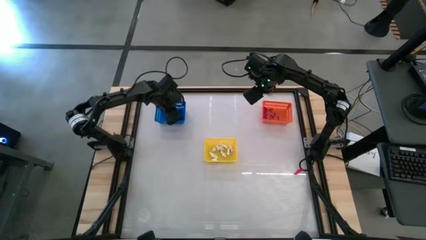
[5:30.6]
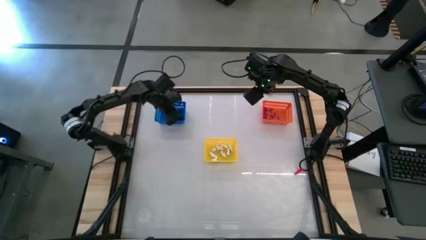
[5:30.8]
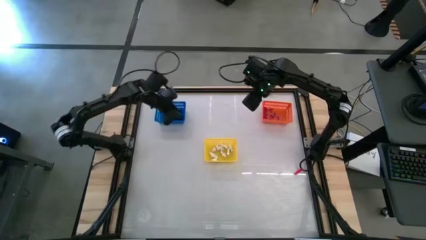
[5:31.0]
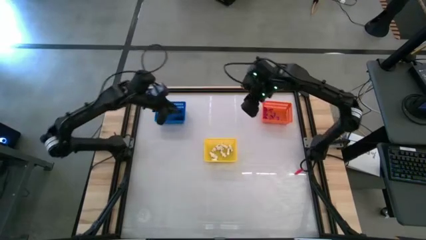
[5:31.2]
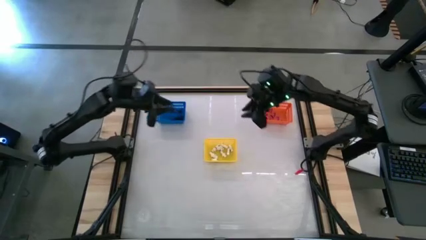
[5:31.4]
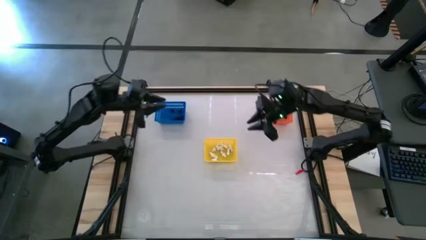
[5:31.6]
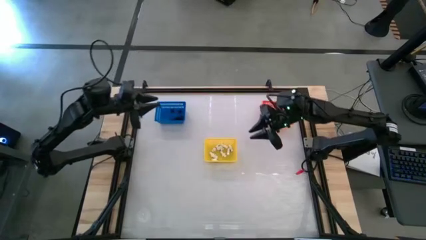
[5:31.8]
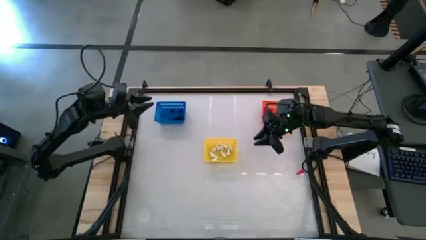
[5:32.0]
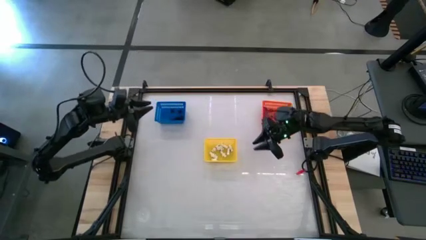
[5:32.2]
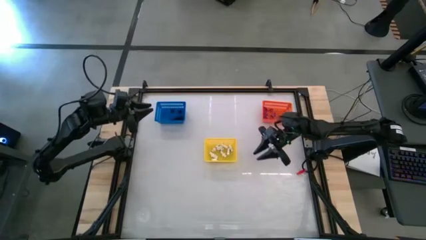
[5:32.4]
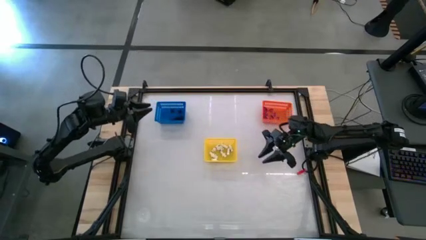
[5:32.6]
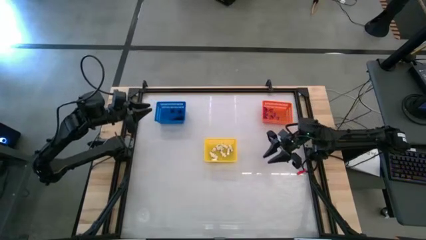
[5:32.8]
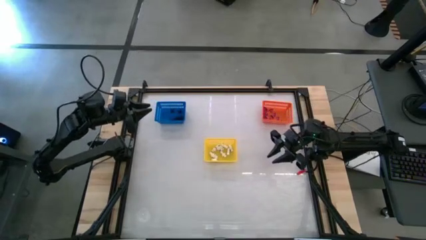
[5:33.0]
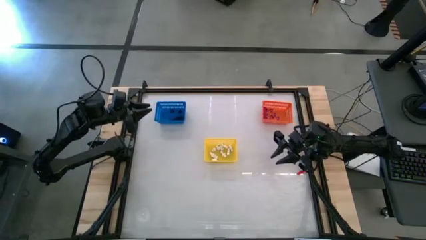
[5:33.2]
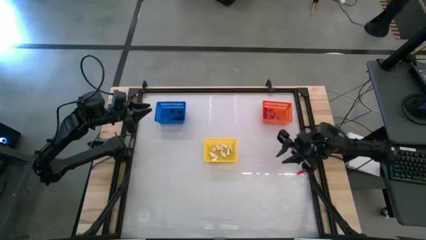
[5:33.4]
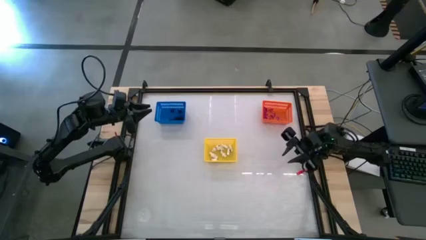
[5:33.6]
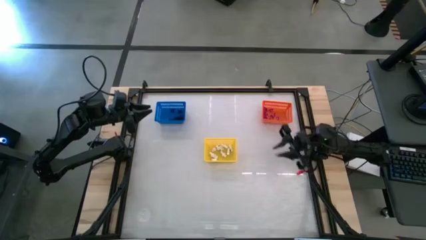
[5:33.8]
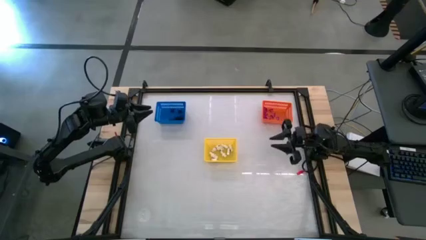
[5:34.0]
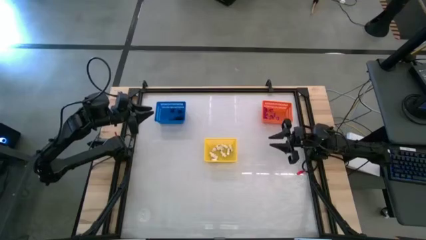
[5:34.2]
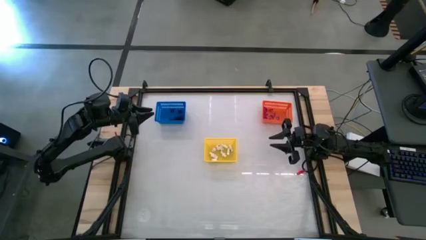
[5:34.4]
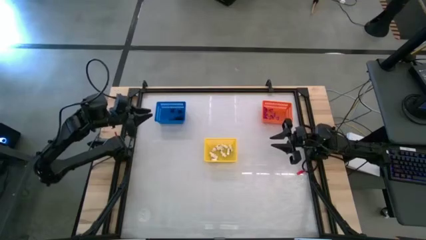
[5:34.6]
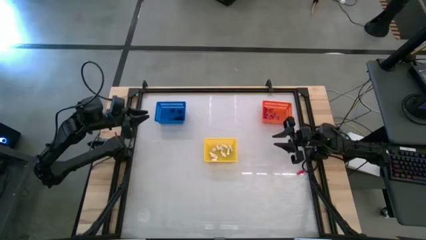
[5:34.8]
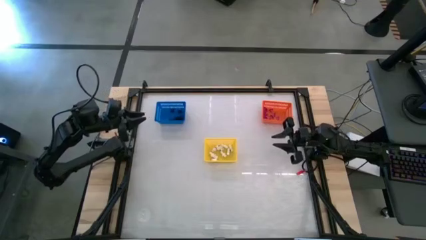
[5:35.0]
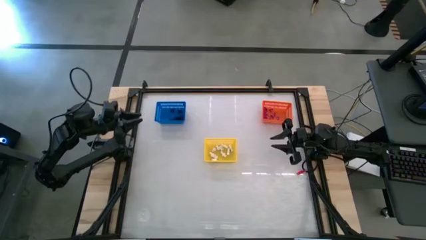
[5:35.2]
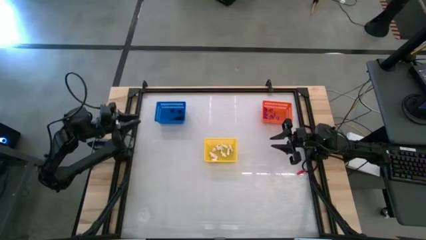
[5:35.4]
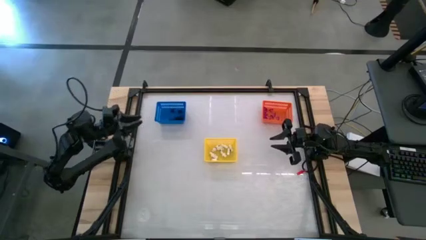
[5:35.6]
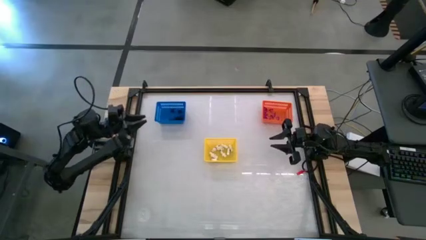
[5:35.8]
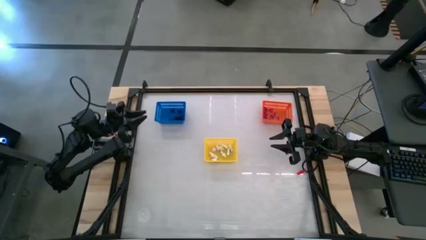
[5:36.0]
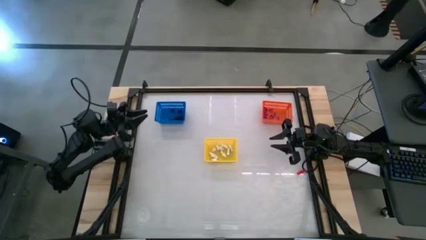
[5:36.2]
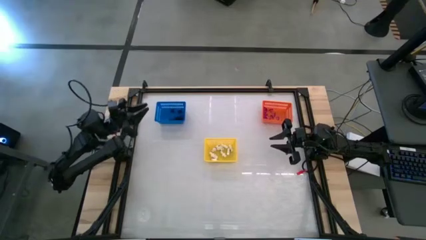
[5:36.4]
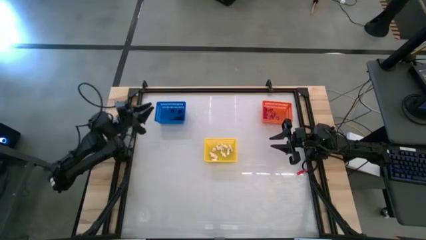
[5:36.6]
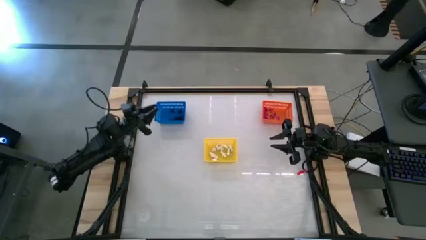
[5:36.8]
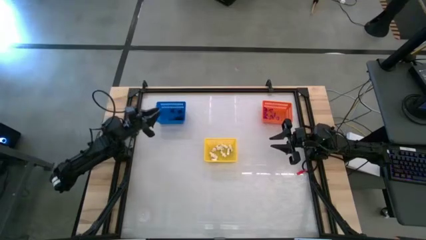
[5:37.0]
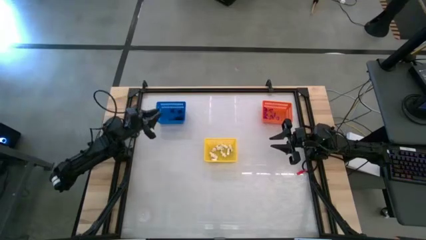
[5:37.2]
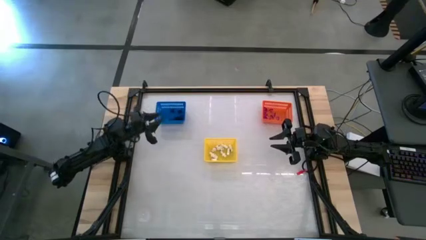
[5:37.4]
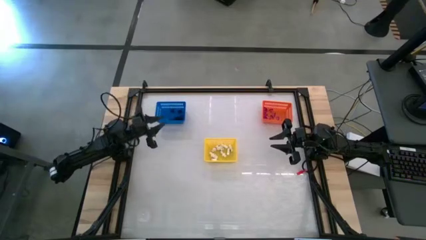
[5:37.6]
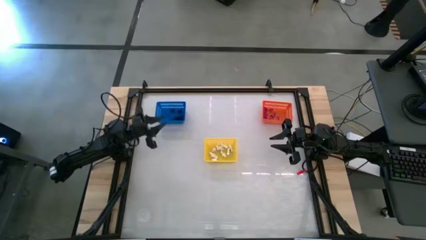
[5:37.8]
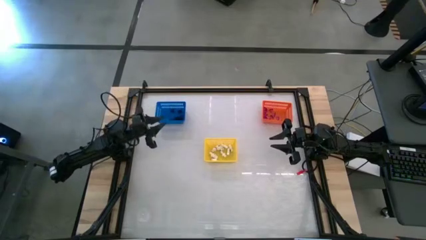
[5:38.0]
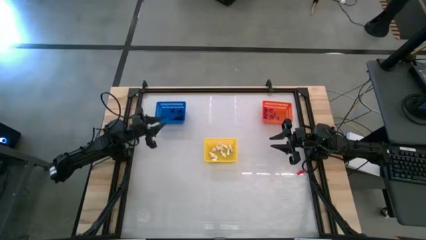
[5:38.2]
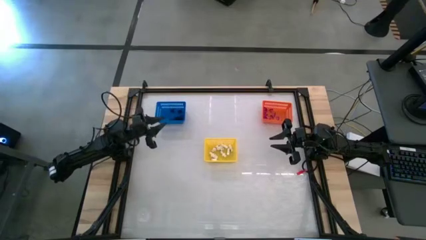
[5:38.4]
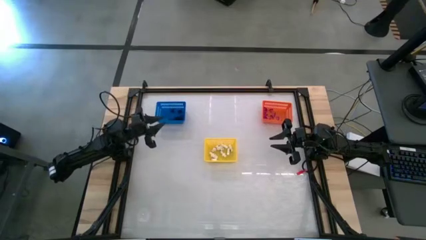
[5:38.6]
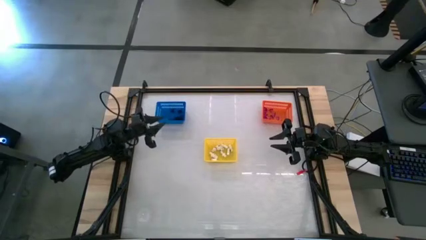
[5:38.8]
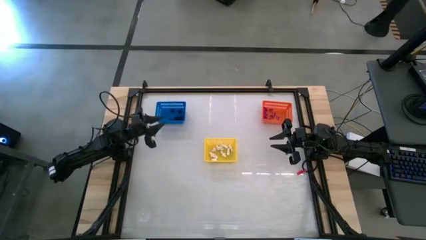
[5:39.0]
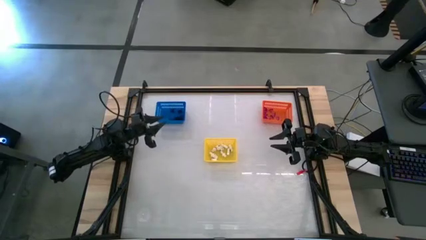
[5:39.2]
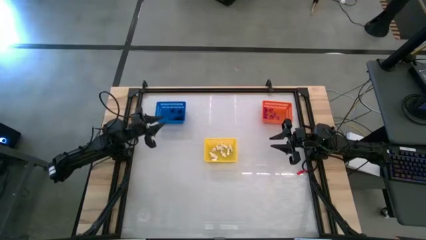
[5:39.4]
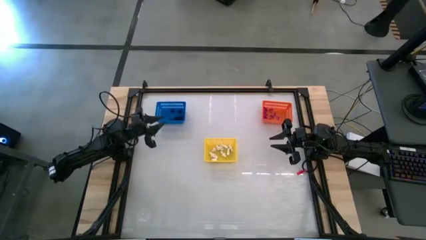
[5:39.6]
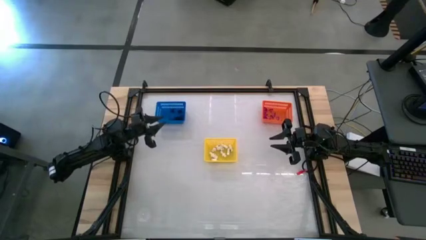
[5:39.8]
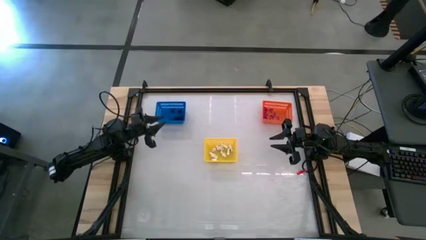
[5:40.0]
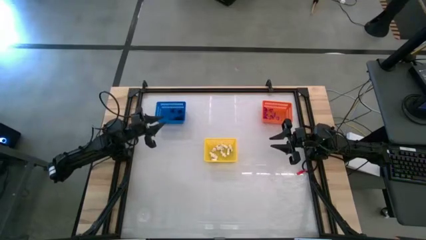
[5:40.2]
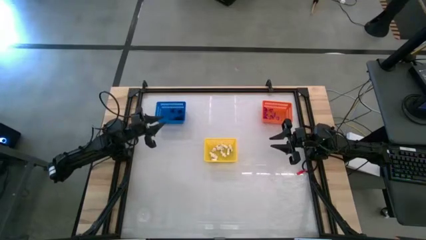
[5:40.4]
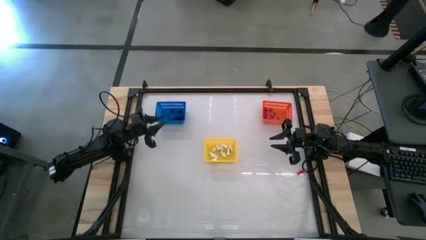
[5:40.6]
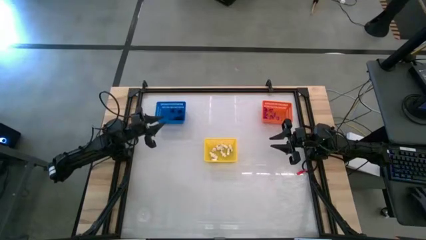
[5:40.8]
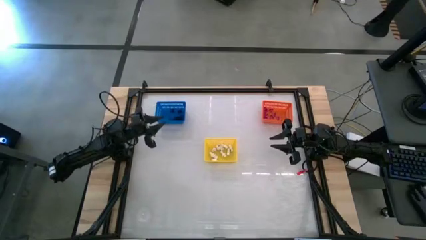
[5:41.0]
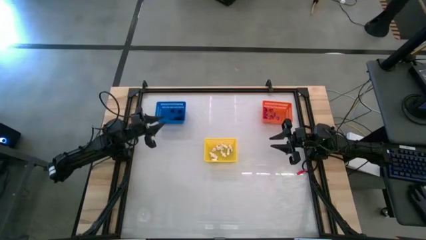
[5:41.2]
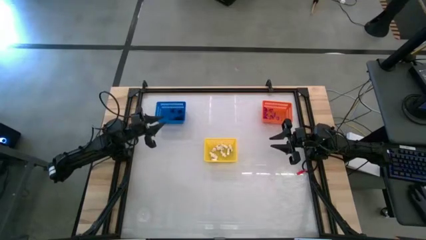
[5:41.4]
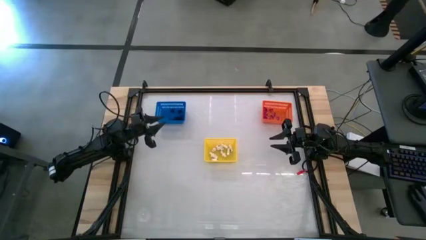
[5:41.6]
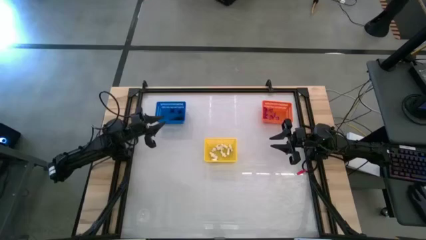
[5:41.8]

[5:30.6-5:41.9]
Task: Sort Halloween decoration
Return to Home Position

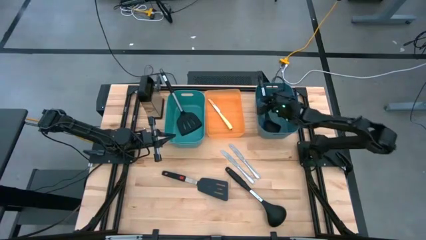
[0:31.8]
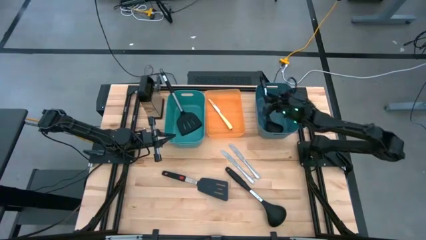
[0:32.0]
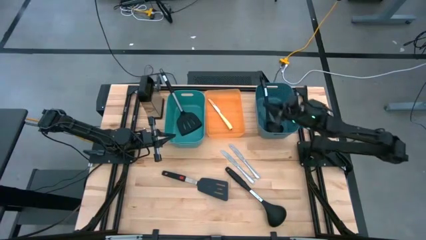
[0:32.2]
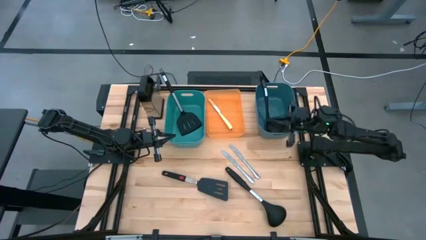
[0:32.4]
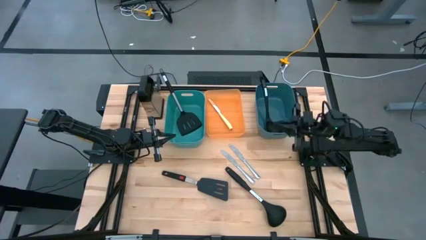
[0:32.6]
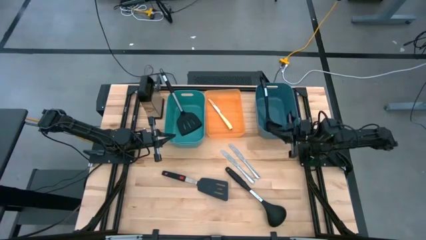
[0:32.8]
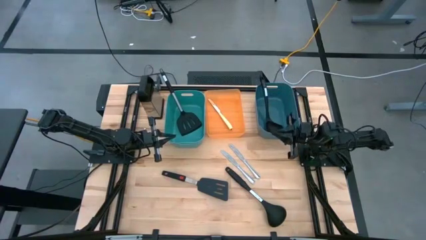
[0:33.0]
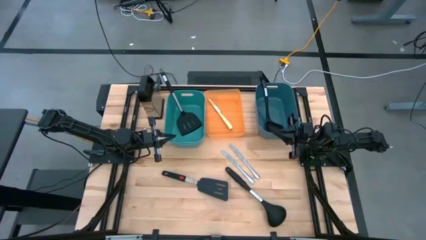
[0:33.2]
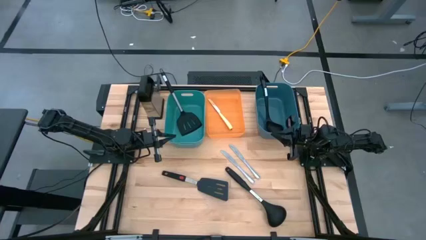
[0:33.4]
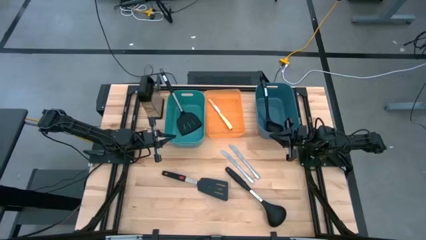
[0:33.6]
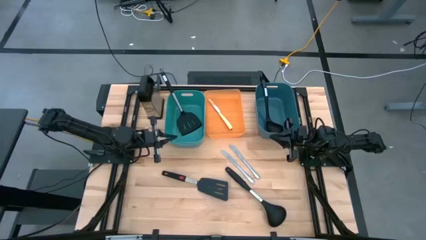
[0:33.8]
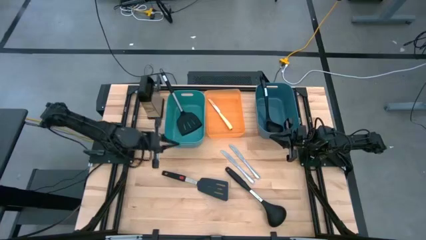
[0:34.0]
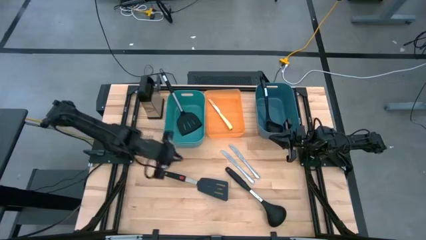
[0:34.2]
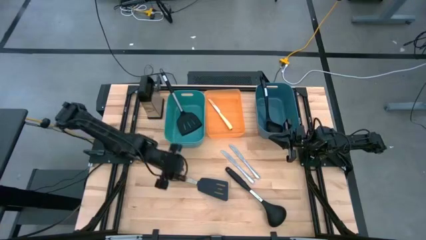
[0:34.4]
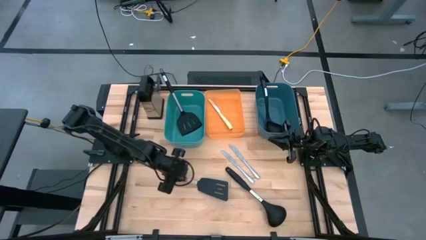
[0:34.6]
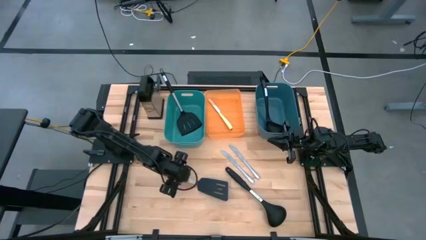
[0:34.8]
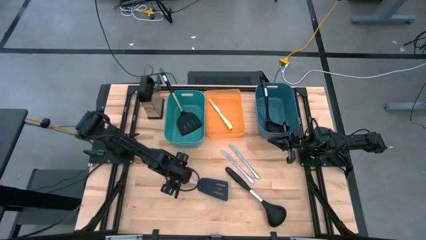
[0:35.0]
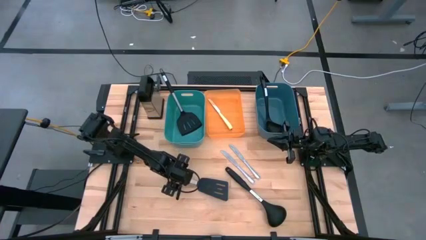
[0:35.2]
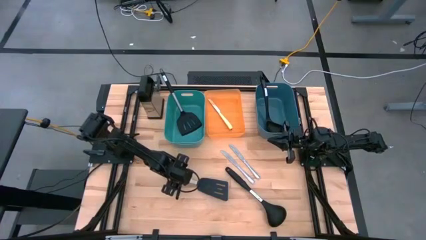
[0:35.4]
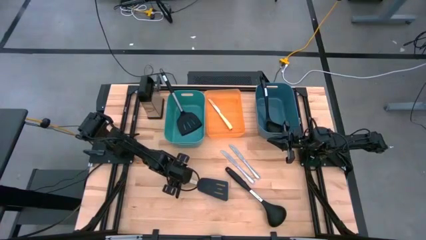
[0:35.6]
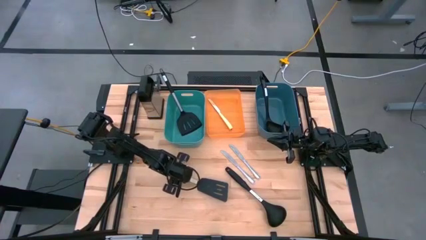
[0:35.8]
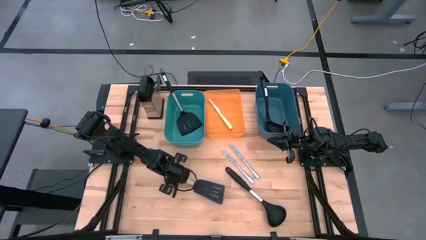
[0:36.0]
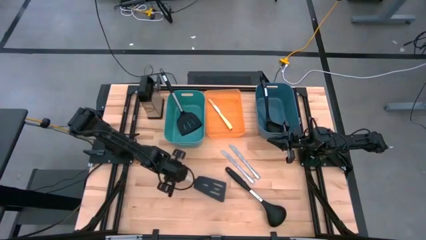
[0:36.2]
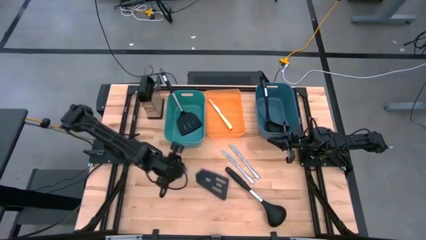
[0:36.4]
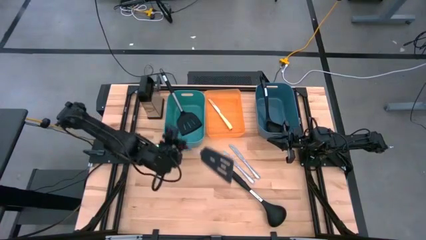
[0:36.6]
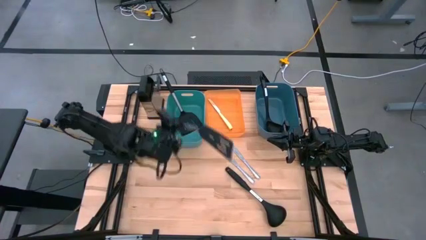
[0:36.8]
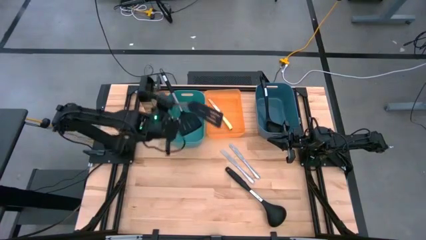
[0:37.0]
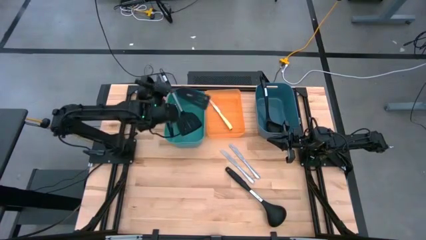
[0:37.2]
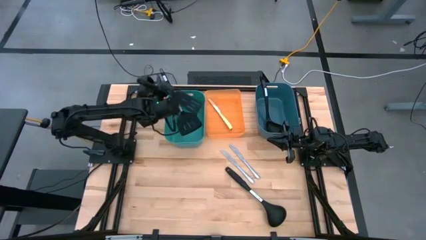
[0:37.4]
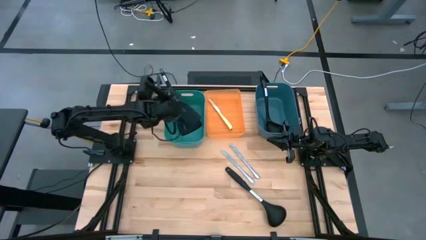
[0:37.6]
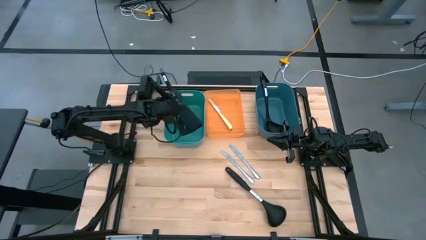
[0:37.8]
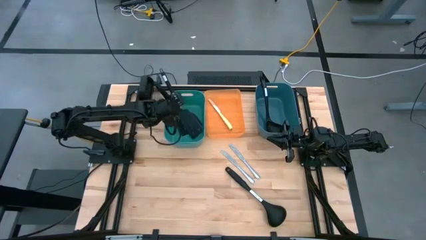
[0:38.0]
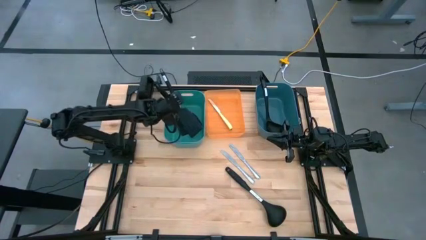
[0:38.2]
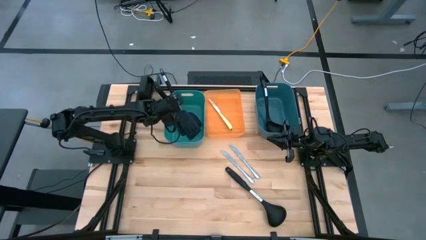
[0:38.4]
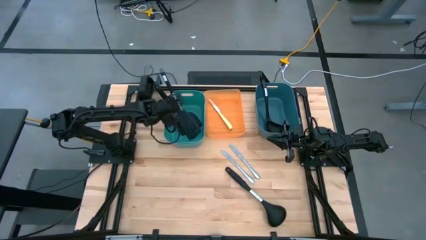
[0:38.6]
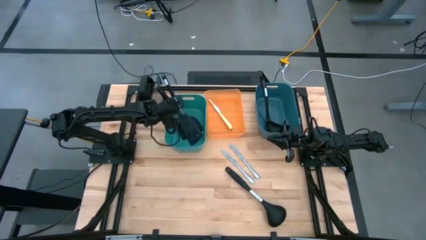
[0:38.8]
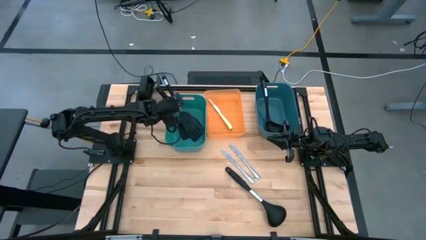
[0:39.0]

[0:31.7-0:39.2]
Task: Pick & Place Kitchen Items
Put the black slotted spatula into the green bin
